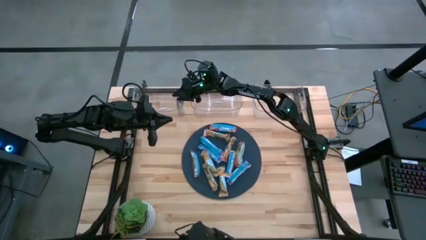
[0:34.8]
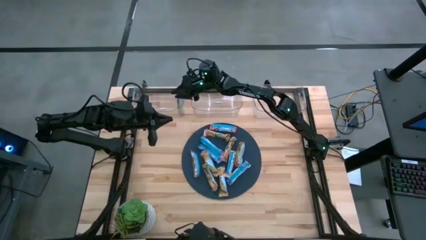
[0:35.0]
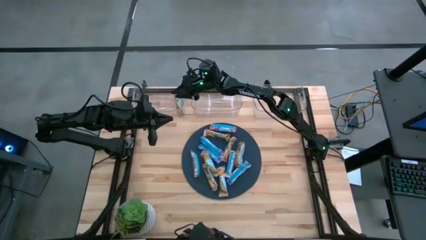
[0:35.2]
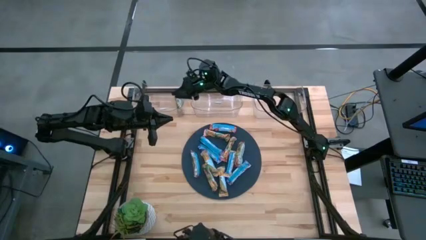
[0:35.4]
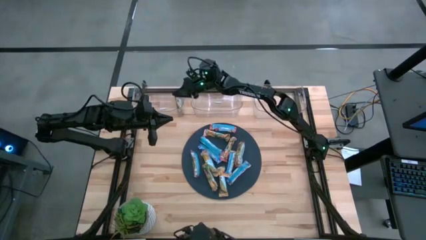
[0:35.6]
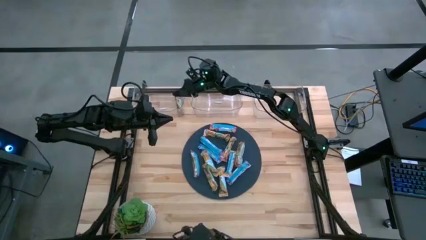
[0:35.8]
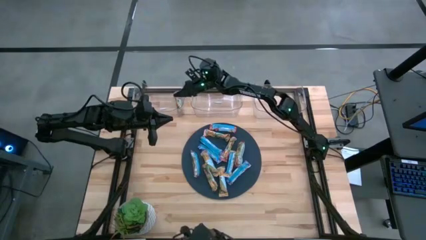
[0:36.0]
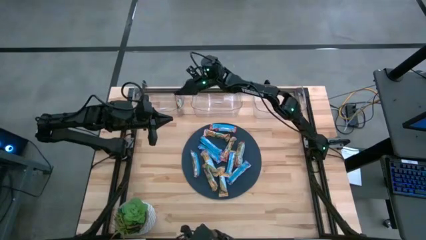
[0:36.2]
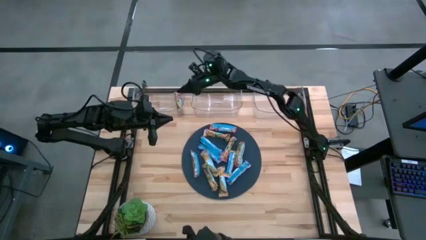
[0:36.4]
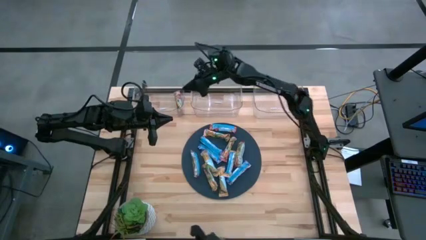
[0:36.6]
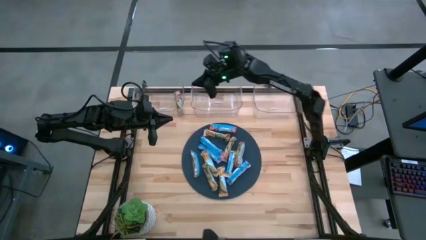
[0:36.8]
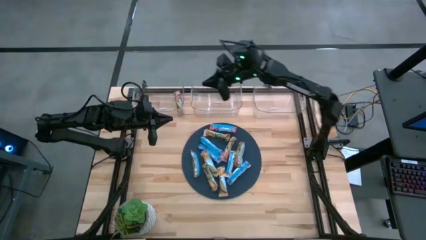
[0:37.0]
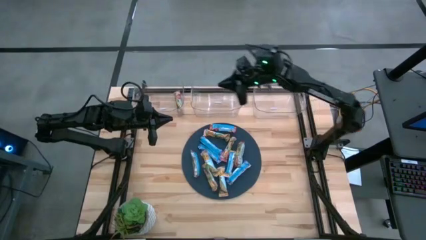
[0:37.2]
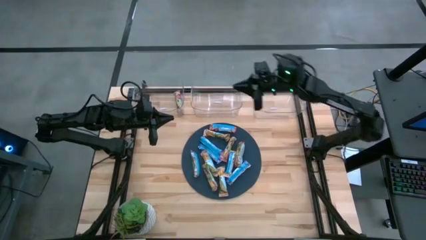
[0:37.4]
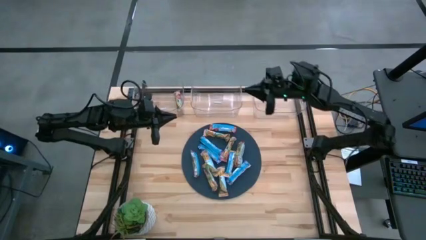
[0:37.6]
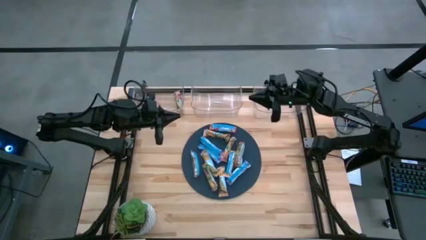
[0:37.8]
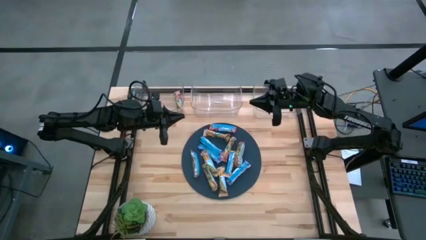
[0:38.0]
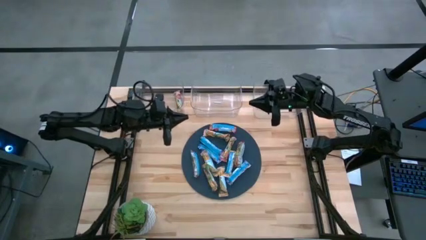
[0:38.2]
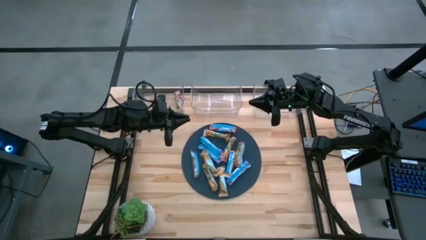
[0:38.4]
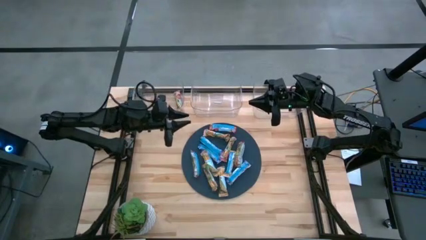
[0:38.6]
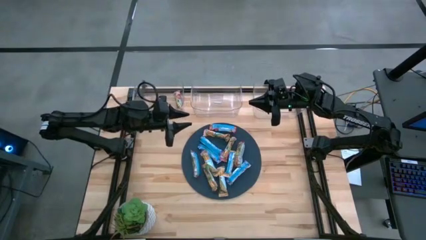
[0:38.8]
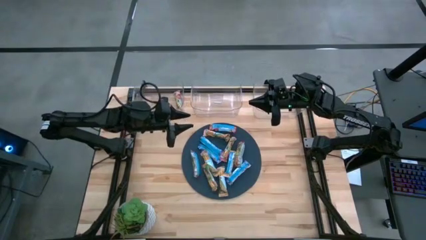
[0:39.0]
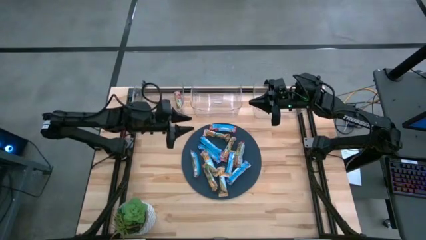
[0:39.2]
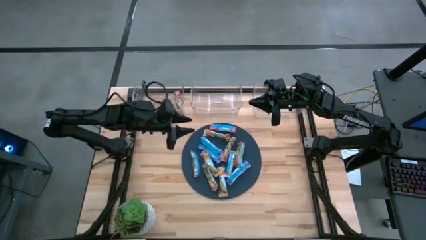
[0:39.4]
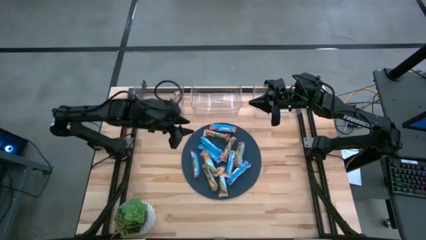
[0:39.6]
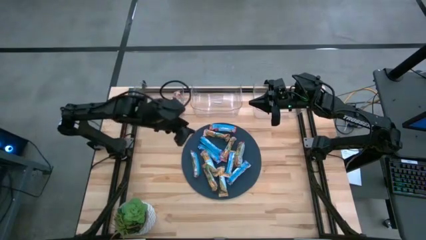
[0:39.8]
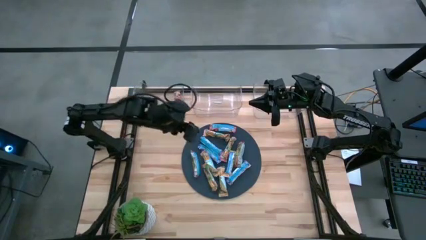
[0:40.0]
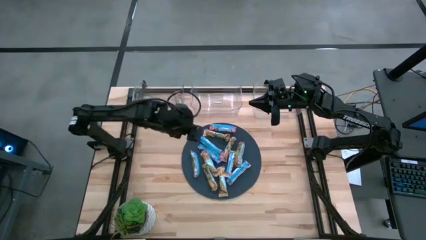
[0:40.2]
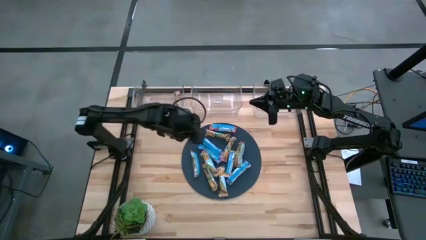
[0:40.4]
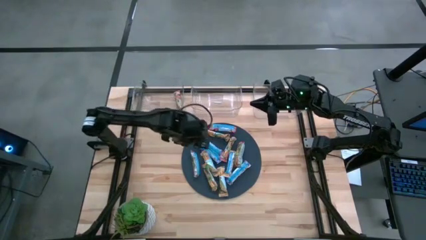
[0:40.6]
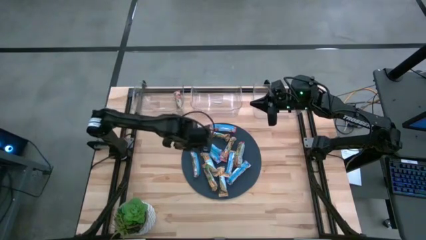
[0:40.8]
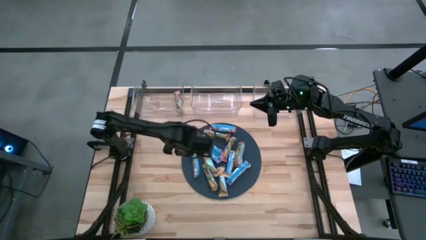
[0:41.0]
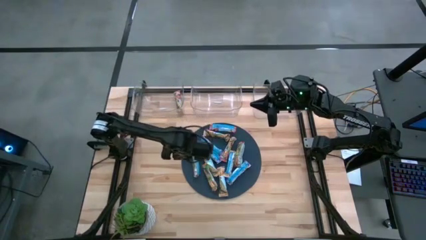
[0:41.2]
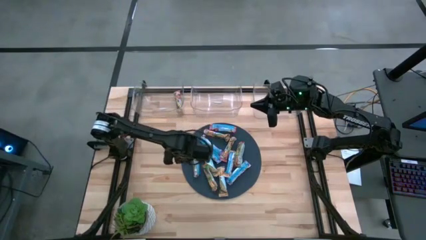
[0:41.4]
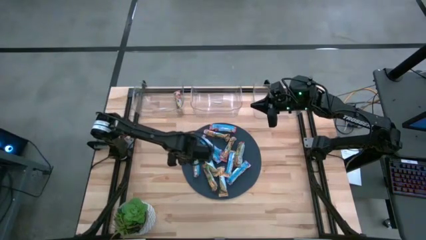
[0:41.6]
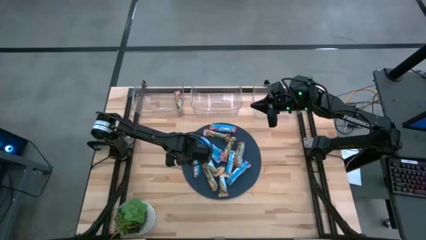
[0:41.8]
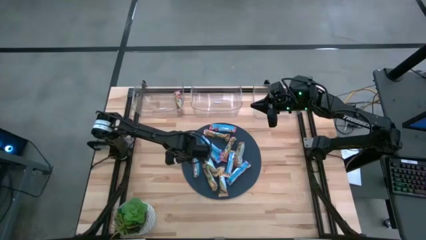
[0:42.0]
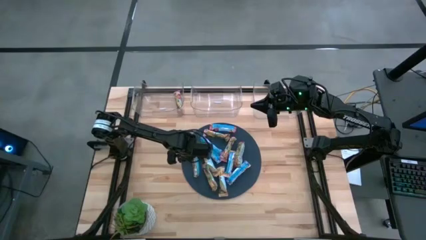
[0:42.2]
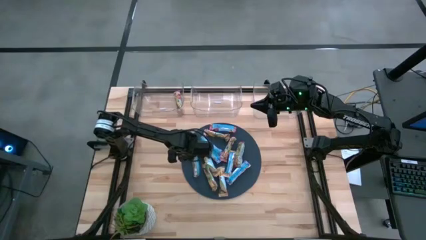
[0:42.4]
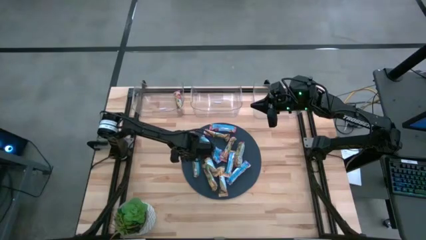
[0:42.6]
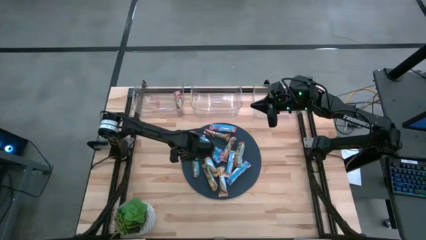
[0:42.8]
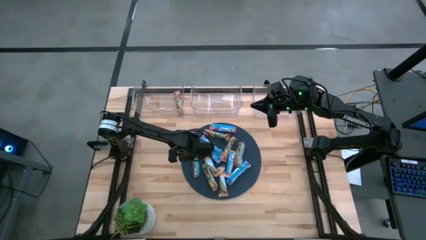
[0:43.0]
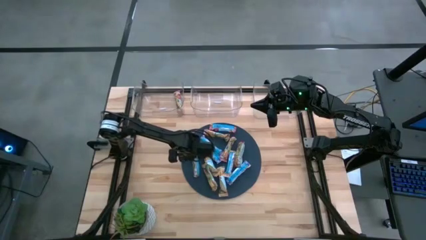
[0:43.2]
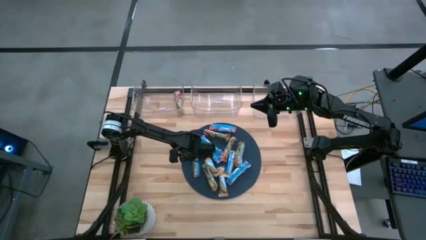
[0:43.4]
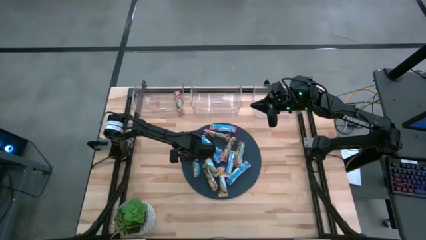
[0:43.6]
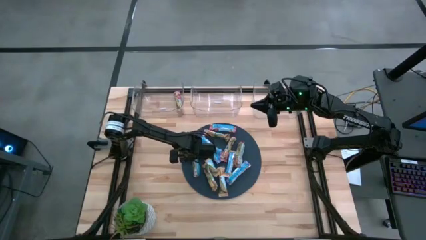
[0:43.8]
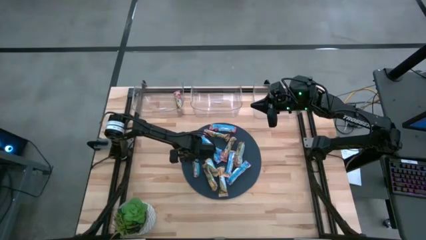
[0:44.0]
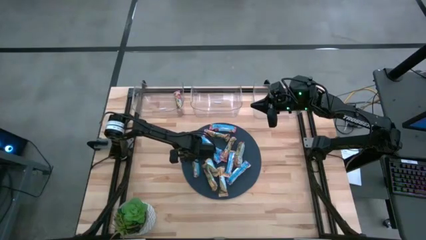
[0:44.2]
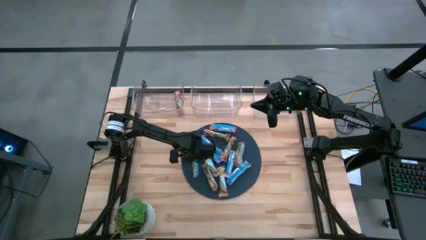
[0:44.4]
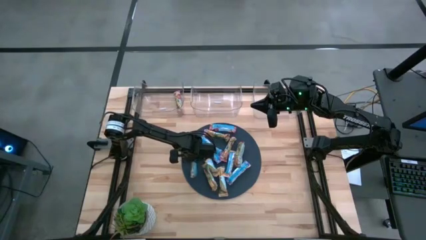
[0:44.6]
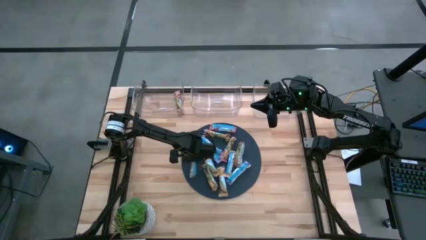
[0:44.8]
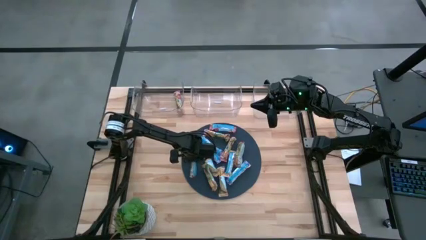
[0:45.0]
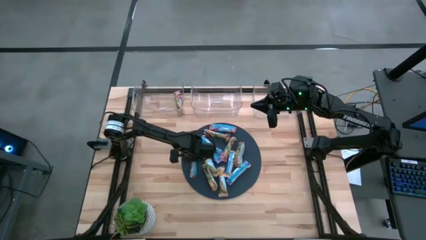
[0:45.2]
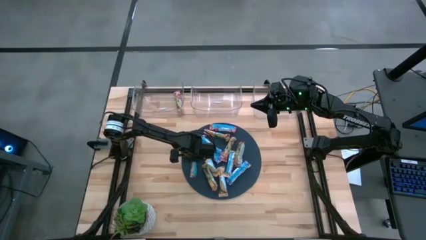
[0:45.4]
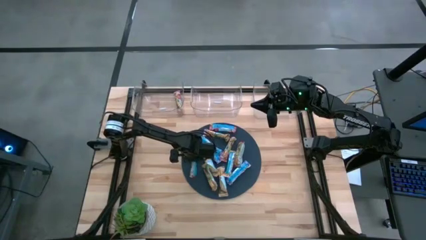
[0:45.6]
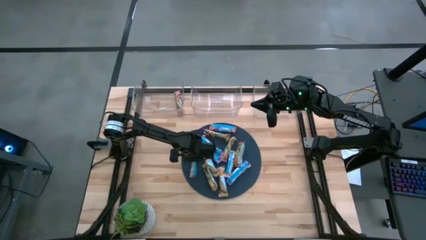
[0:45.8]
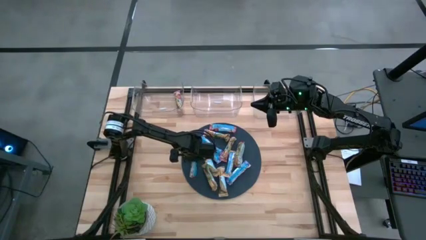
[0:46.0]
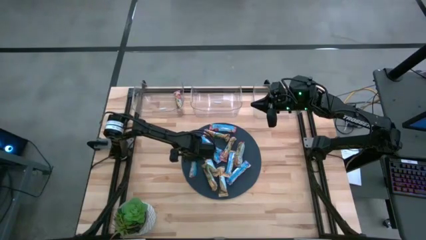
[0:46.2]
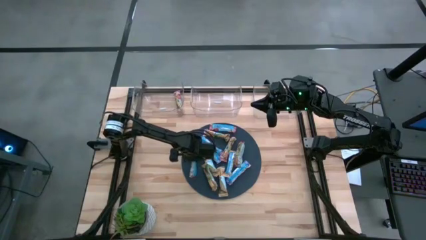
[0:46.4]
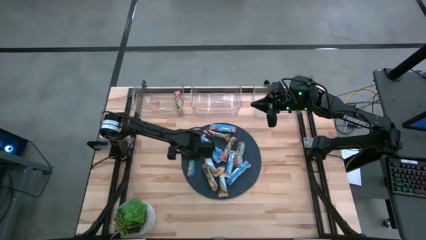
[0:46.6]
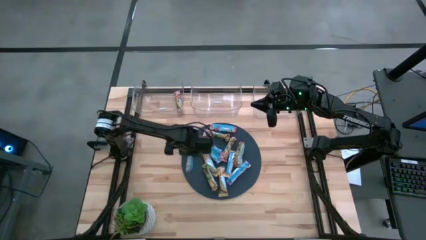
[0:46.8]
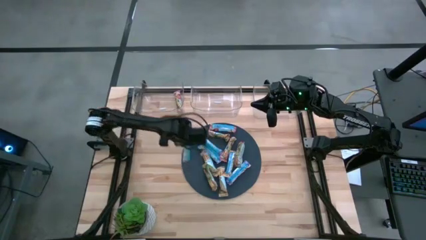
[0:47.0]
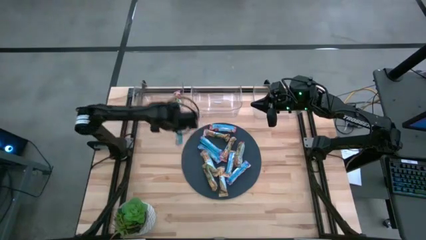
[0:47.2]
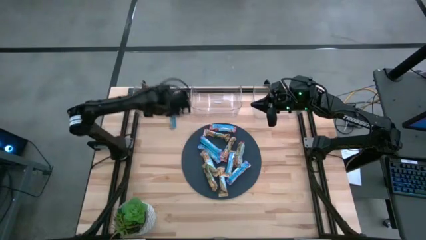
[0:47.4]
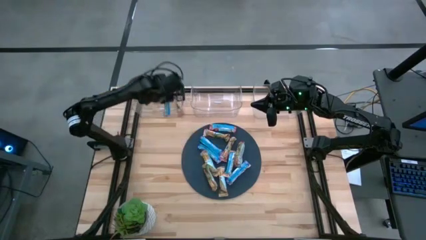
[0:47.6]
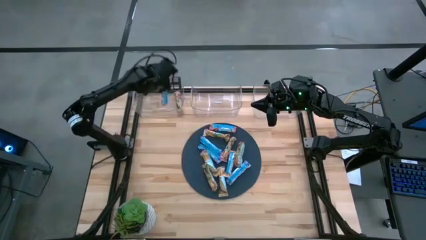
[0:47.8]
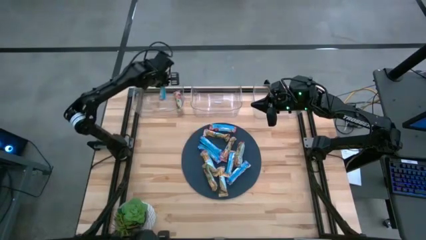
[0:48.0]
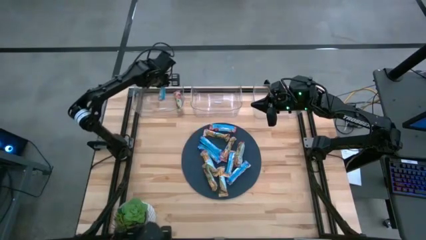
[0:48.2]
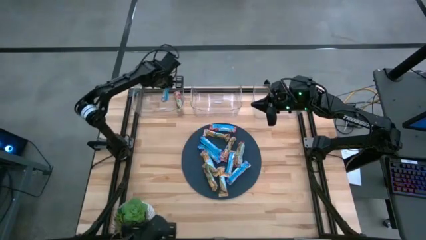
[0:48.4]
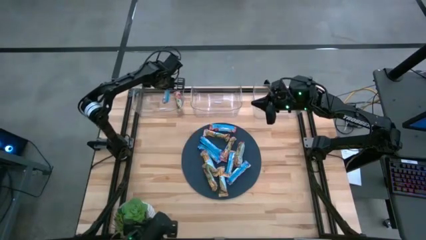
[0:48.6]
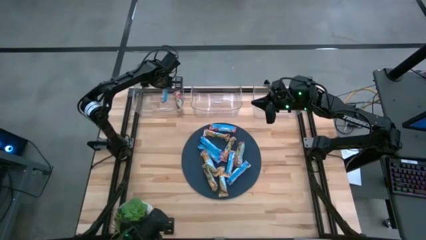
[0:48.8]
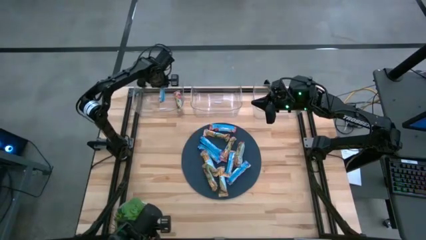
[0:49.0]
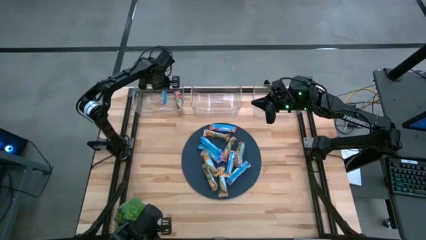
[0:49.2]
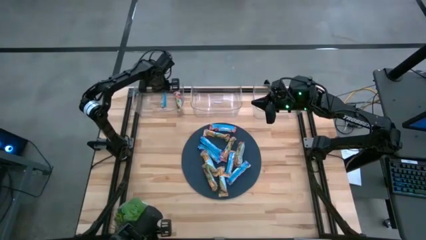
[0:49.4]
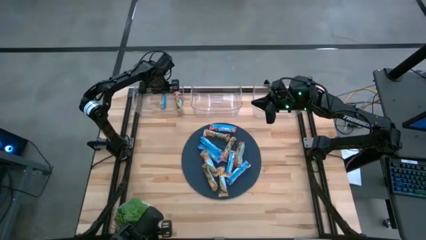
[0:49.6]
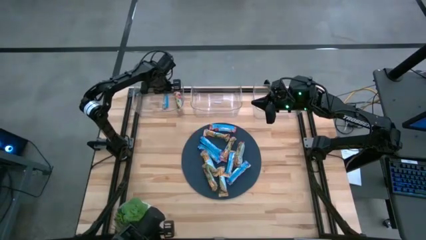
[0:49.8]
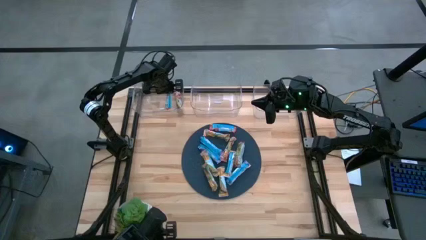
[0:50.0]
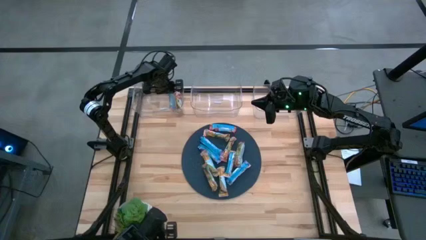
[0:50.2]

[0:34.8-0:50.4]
Task: Pick and place Granola Bars by type
Put the red granola bar into the left transparent bin
